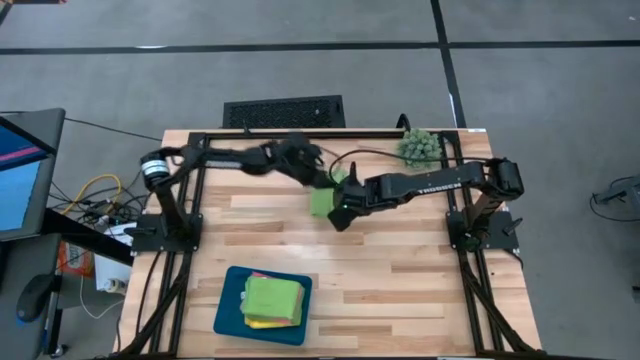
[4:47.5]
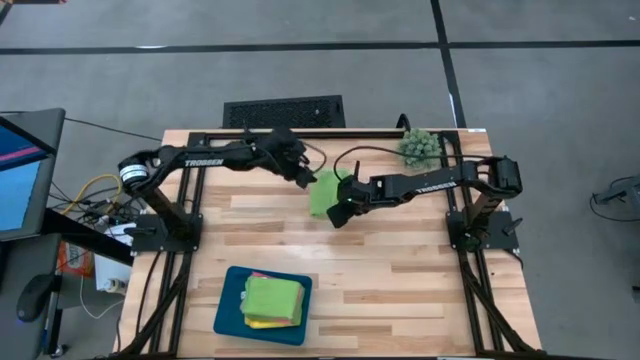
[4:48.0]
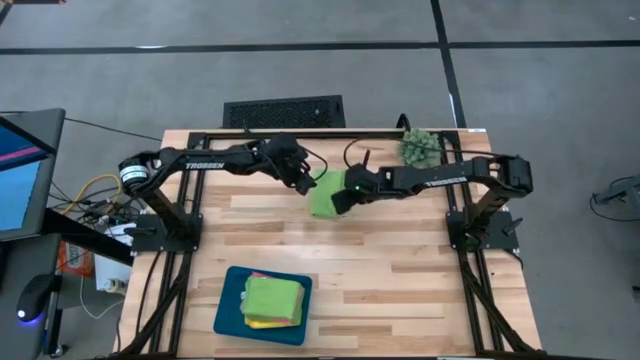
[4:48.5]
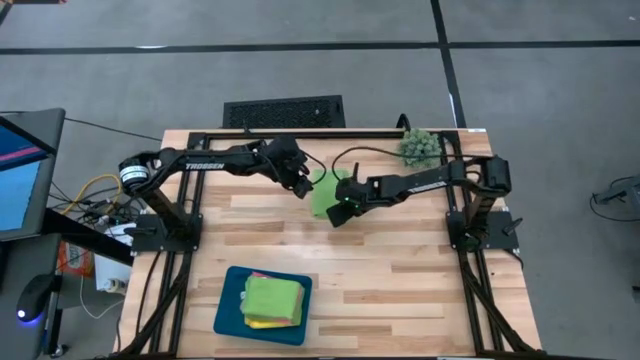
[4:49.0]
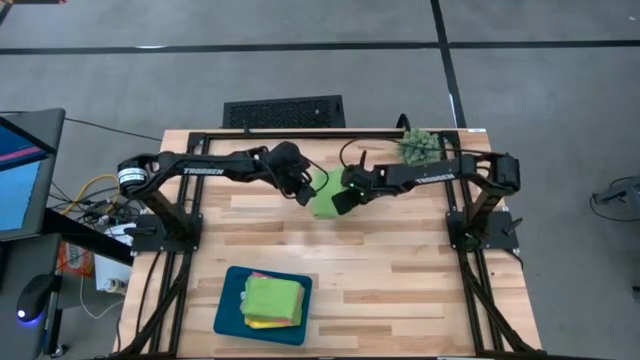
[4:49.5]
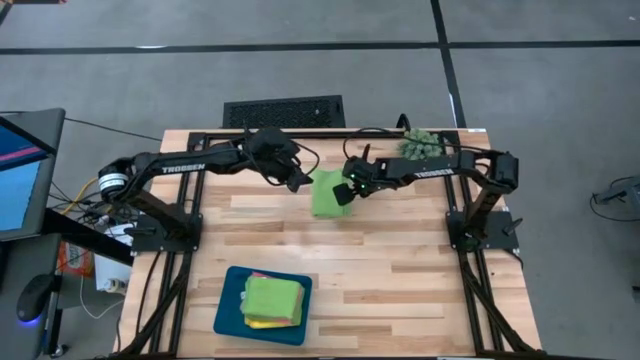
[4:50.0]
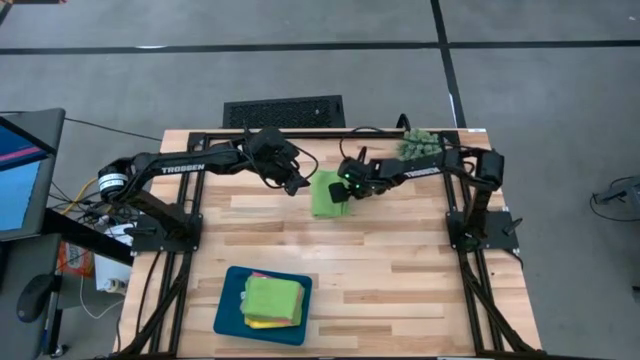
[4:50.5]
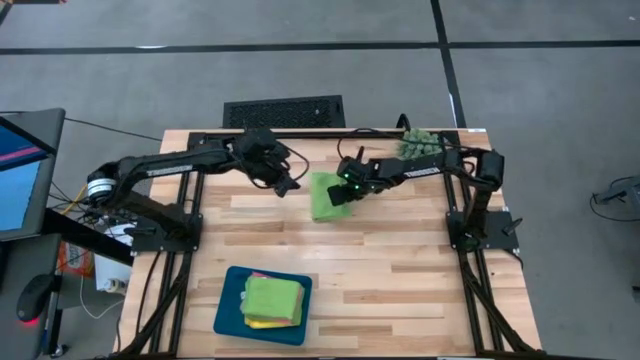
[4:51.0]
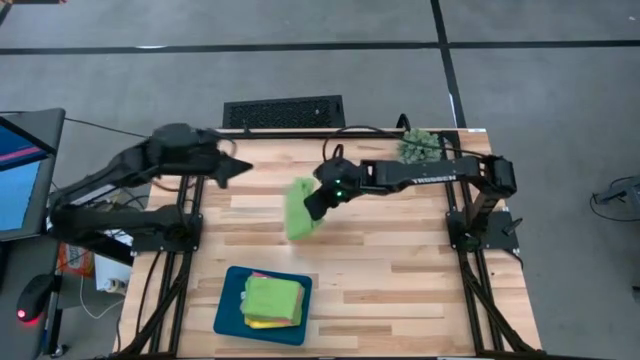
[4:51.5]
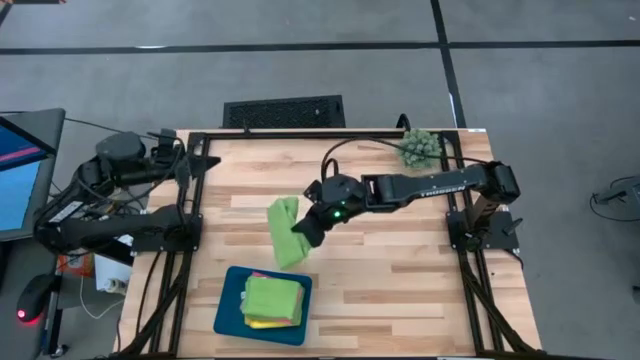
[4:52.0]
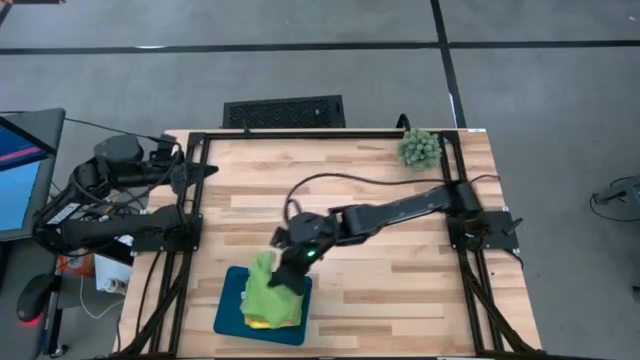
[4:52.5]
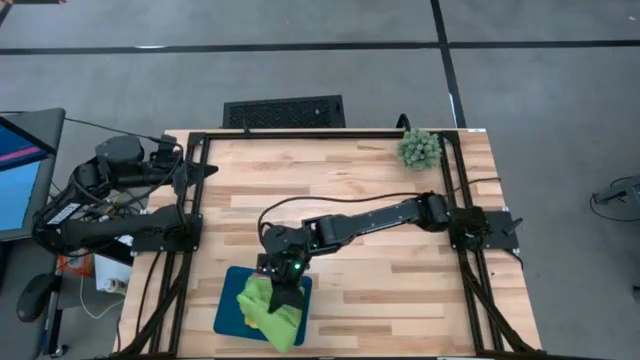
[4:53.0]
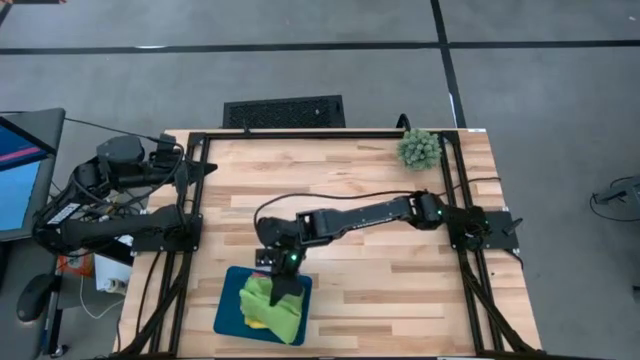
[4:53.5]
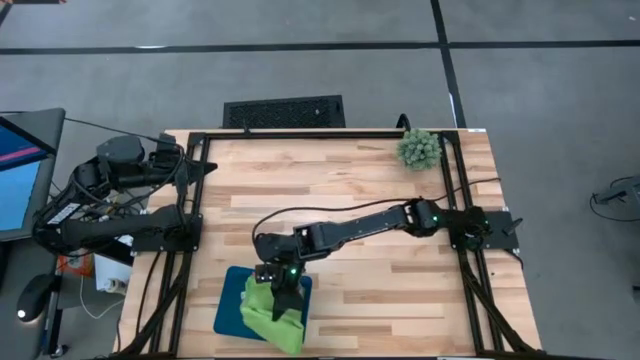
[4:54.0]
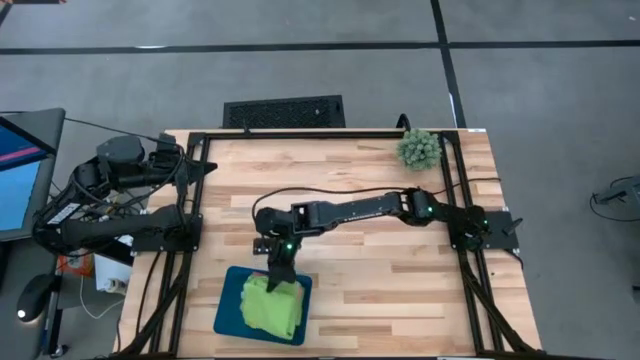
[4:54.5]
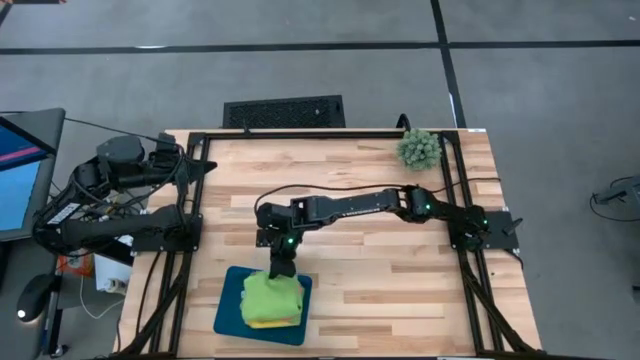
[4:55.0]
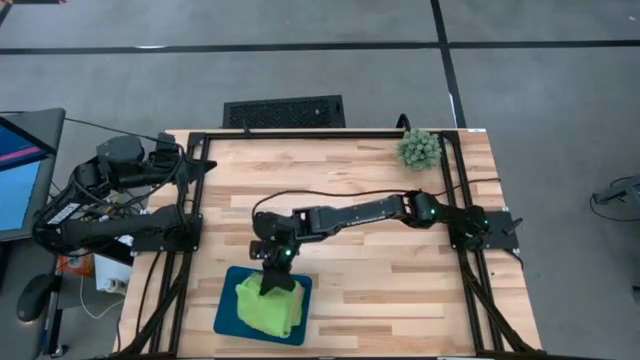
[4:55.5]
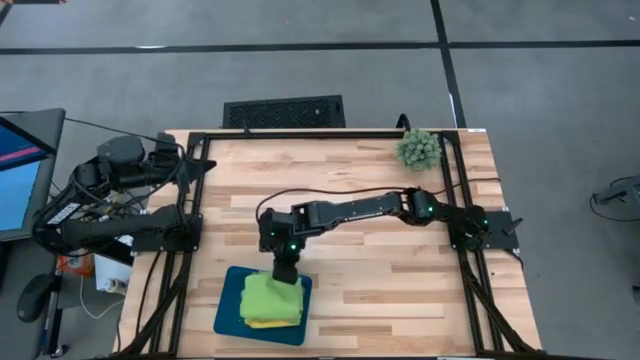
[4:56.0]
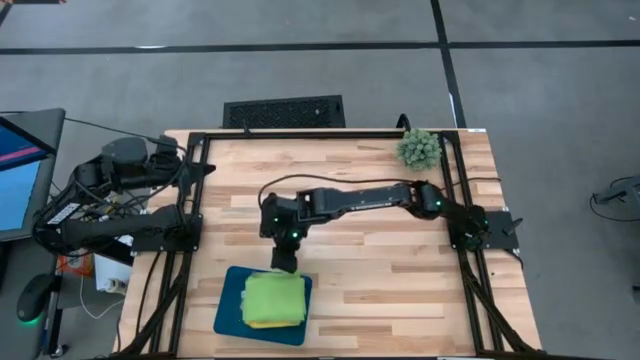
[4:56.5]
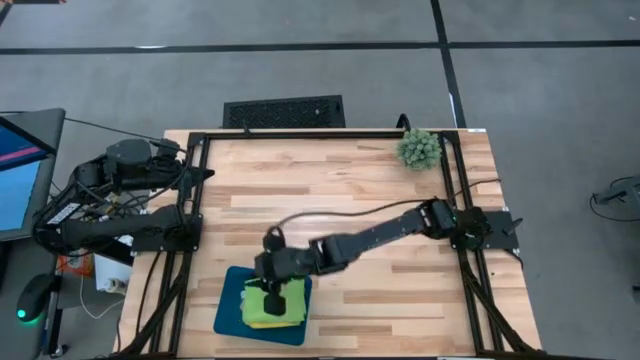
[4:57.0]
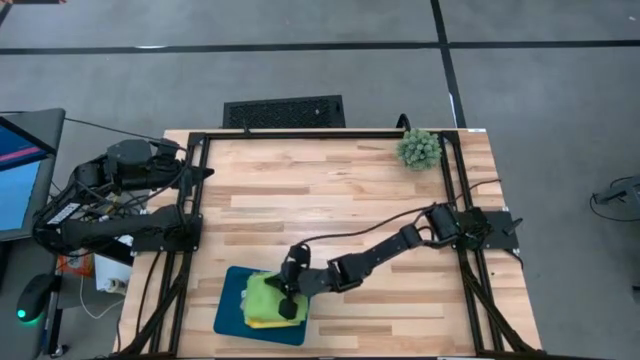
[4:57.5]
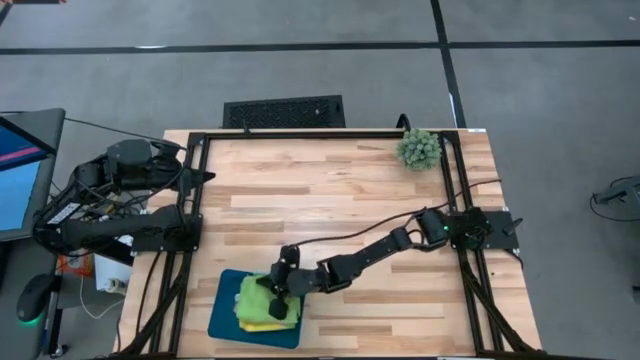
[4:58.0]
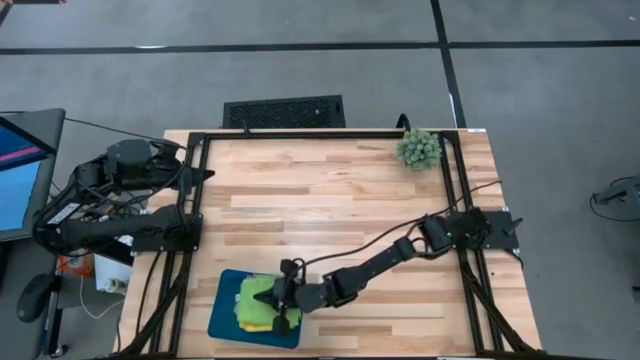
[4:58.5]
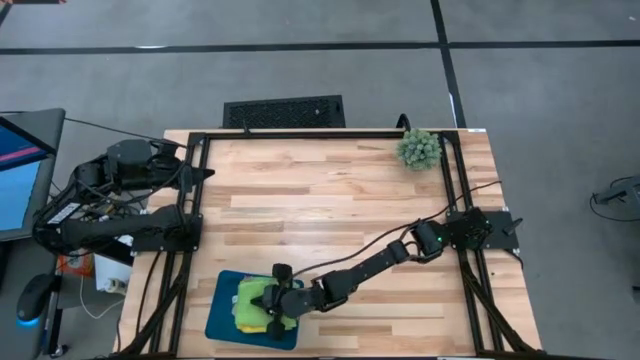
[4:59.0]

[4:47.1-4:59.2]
Task: Fold microfiber towels
Stack the green microfiber towel on top of the other green microfiber towel into the blue bin

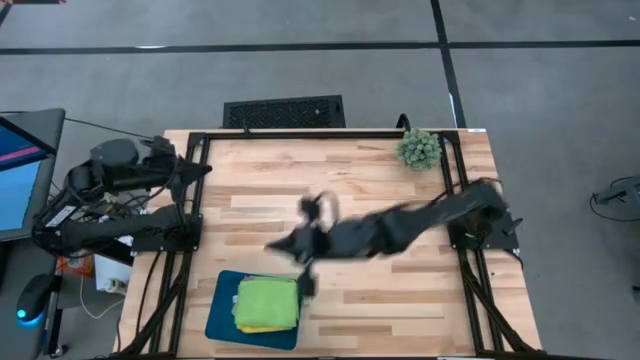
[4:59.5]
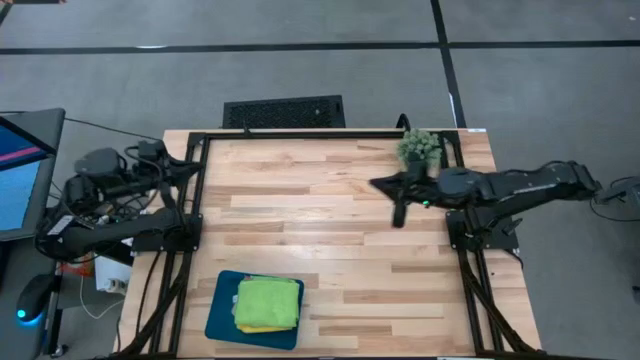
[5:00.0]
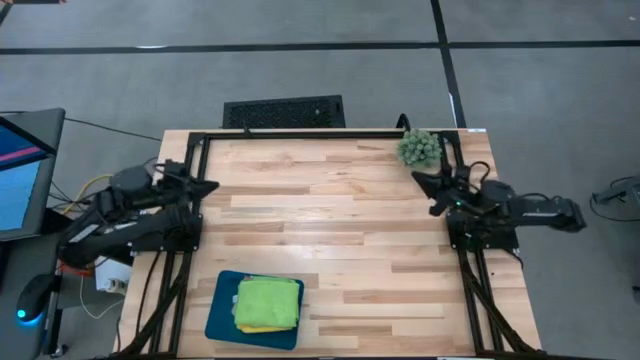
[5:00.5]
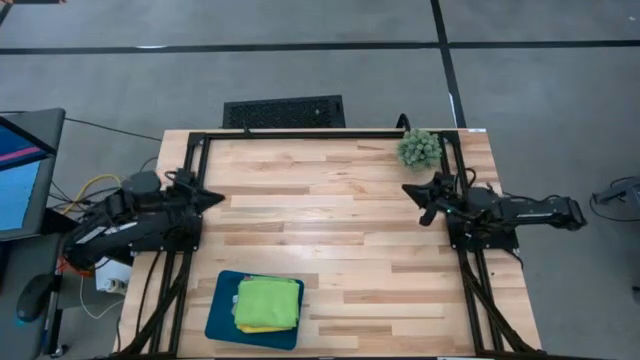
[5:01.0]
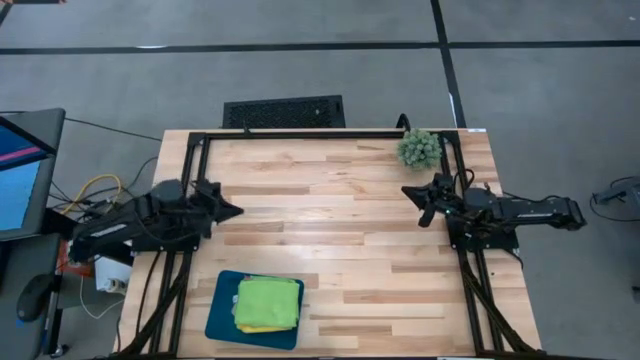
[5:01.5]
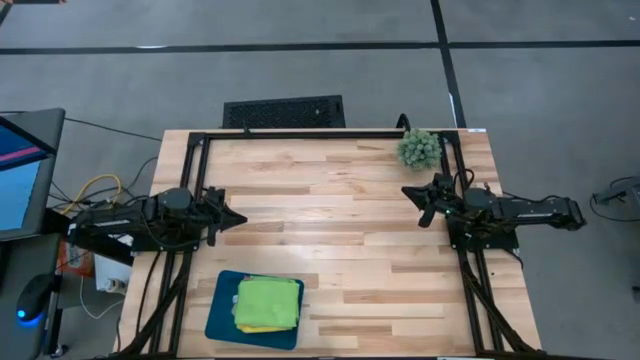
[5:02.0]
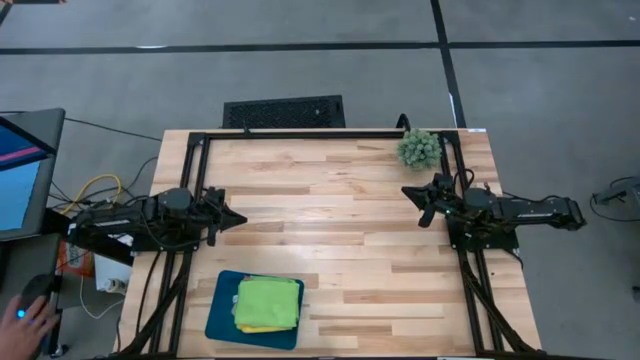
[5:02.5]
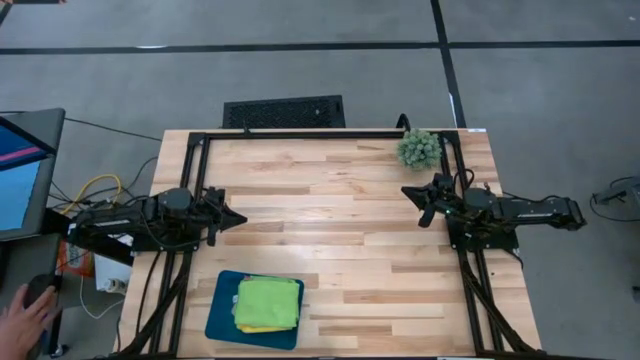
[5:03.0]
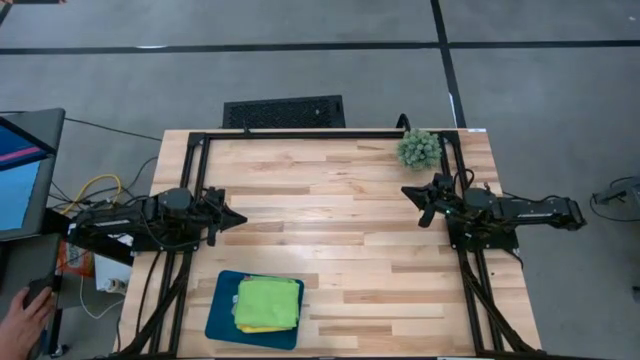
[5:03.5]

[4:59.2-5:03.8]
Return to Home Position

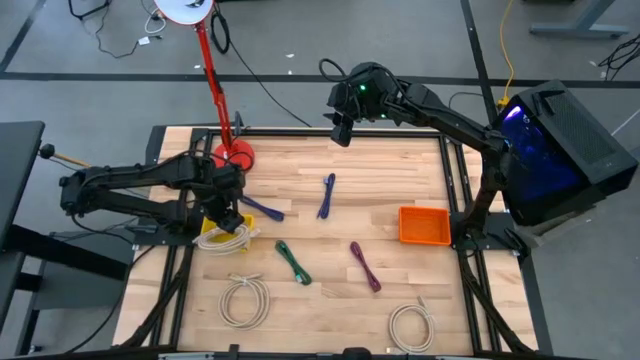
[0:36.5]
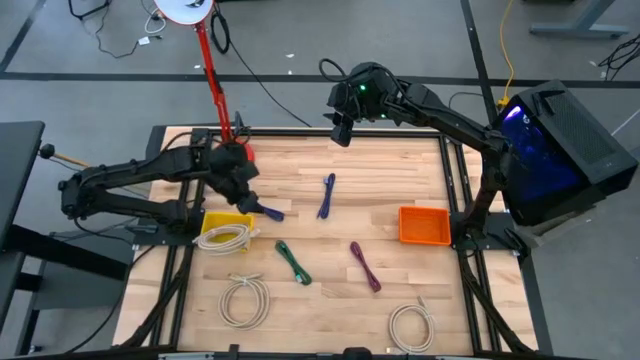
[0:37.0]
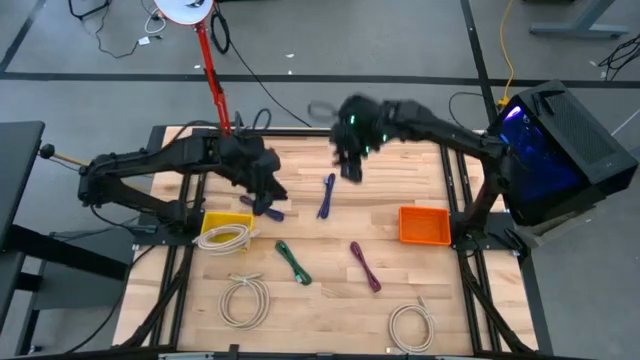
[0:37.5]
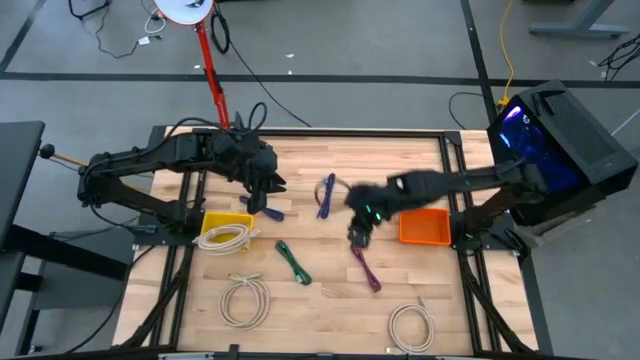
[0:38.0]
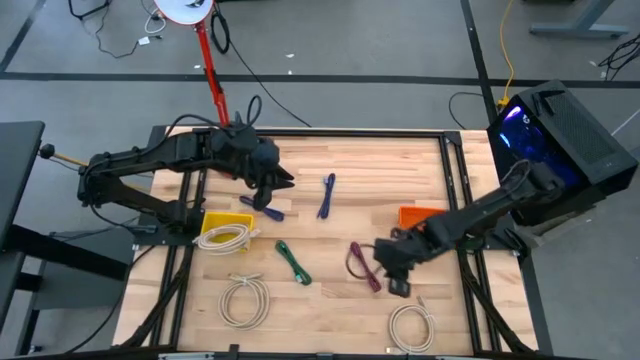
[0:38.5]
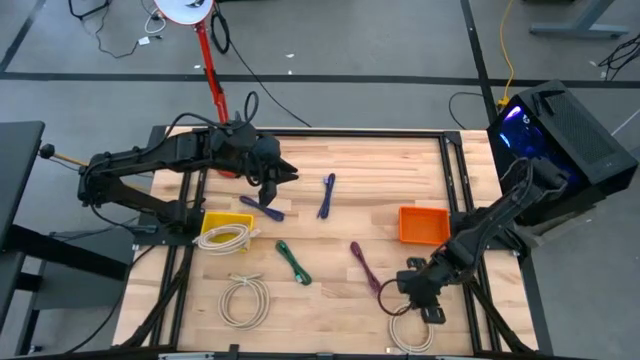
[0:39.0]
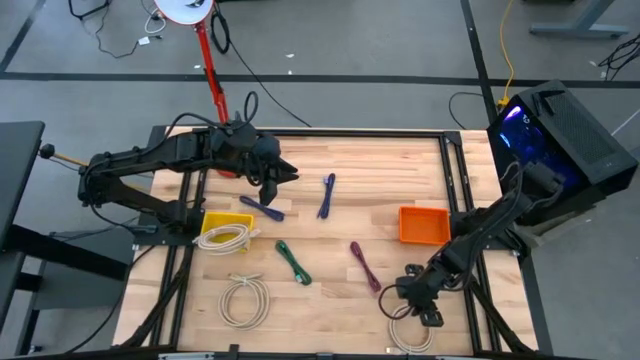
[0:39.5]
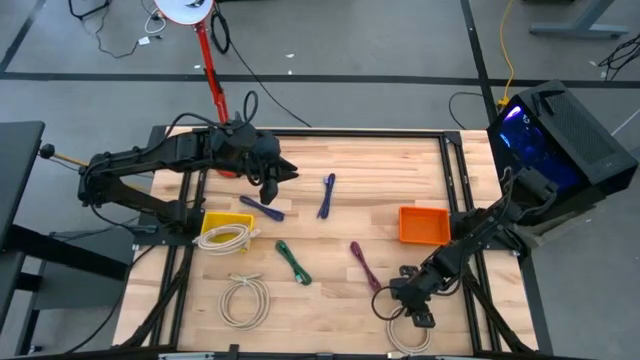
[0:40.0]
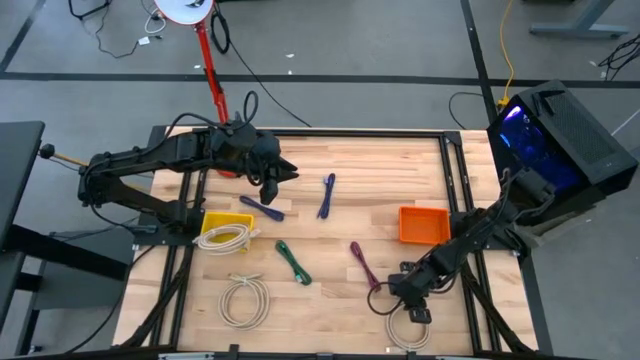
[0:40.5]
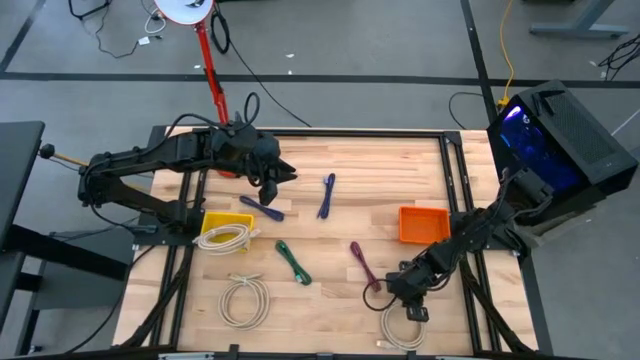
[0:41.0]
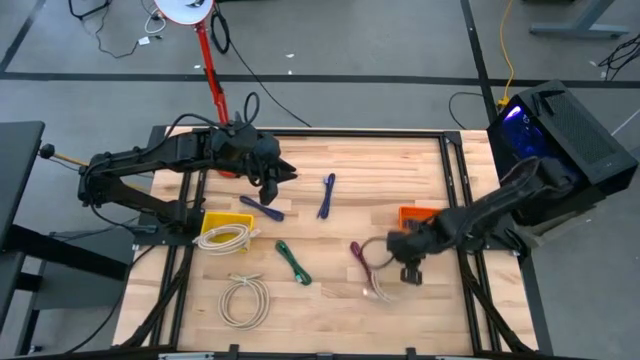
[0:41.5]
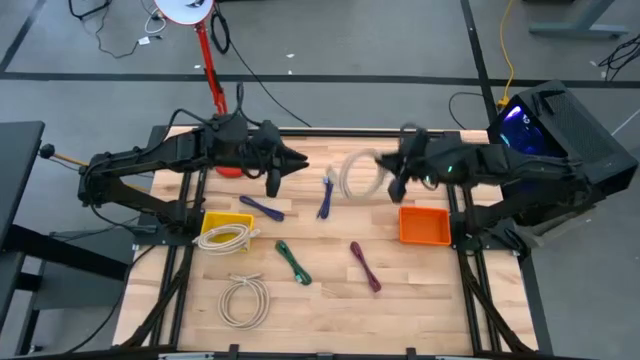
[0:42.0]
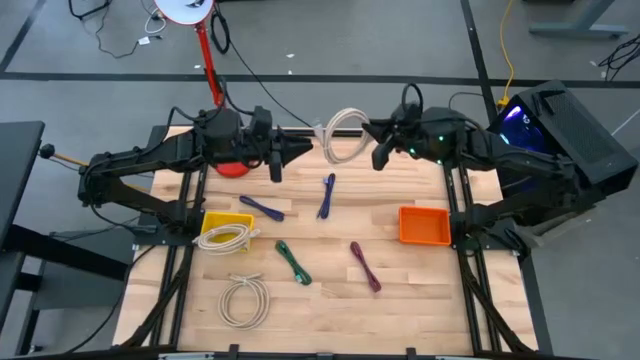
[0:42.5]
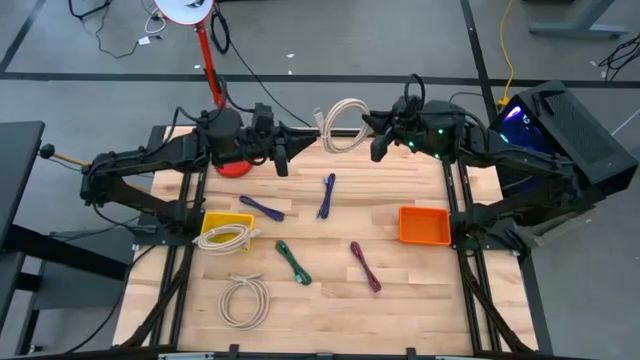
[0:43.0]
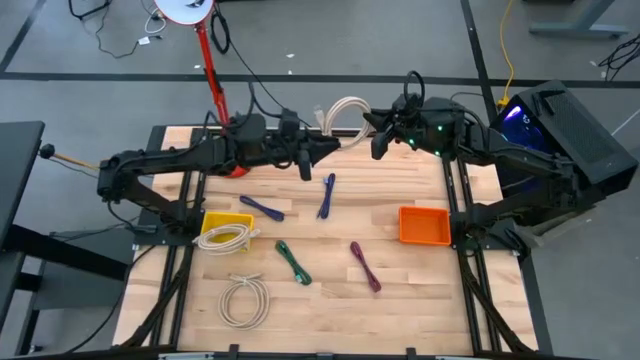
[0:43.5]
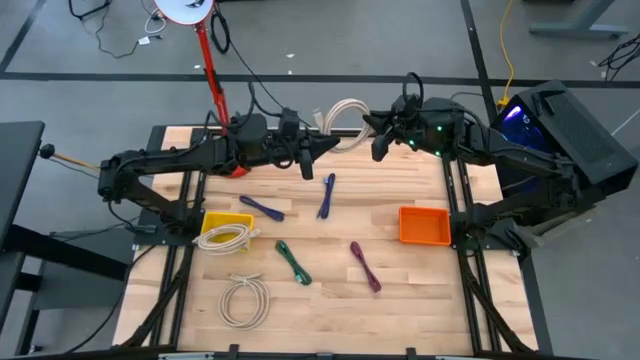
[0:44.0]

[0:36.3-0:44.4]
Task: Pick & Place USB Port
Put the light brown HDMI cable into the yellow bin
